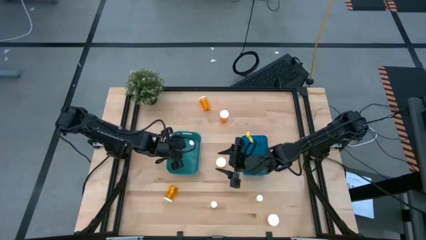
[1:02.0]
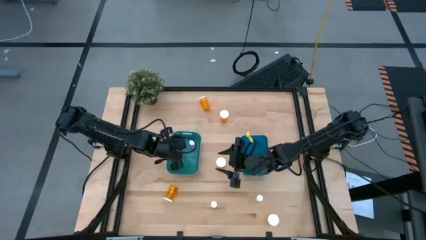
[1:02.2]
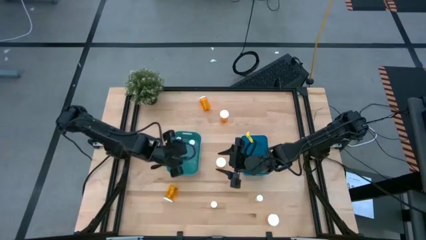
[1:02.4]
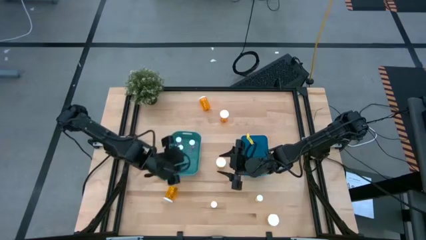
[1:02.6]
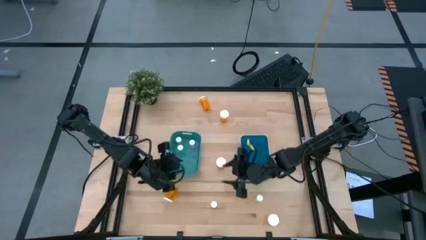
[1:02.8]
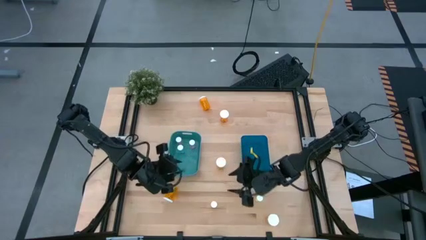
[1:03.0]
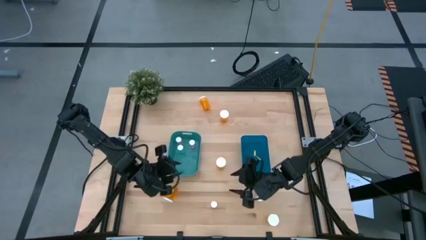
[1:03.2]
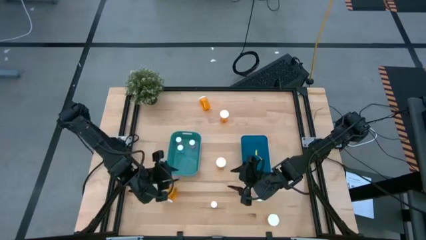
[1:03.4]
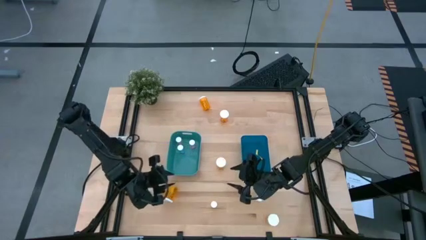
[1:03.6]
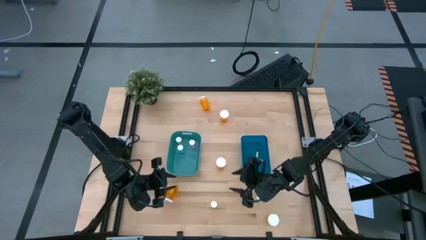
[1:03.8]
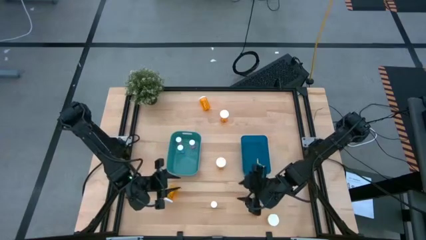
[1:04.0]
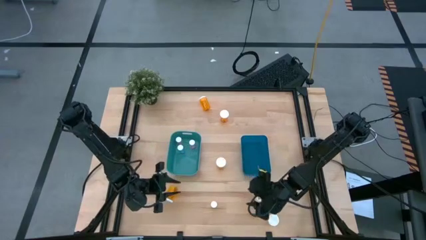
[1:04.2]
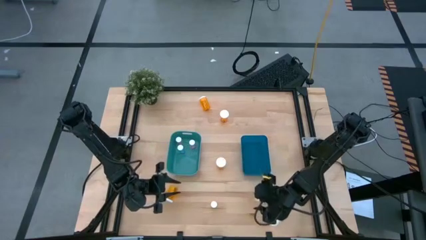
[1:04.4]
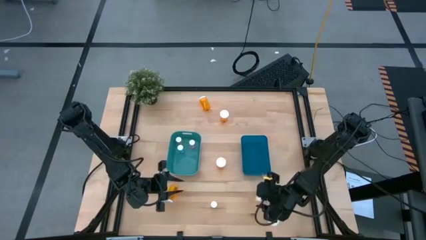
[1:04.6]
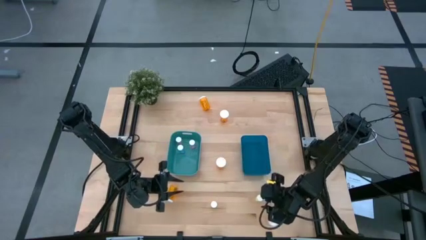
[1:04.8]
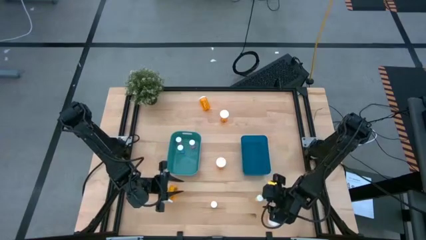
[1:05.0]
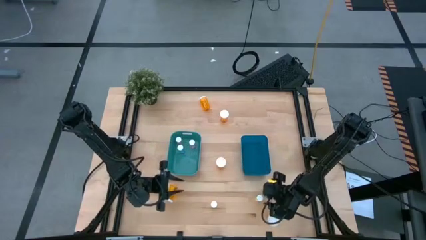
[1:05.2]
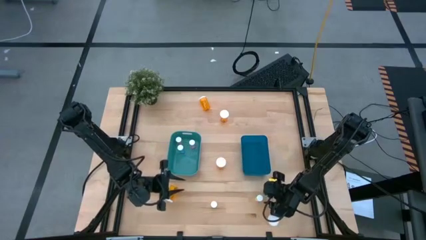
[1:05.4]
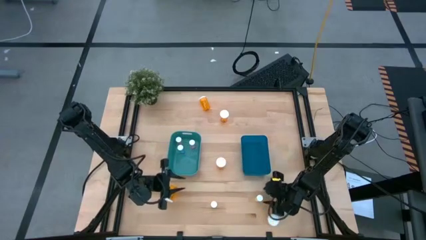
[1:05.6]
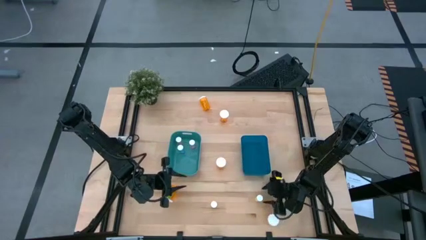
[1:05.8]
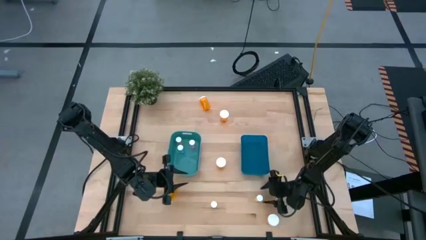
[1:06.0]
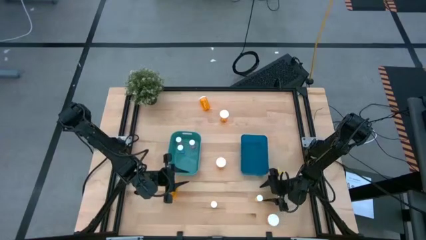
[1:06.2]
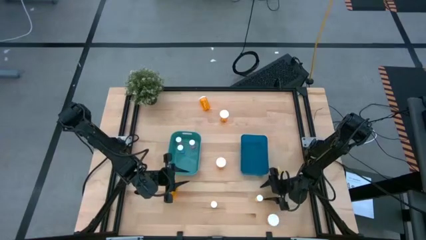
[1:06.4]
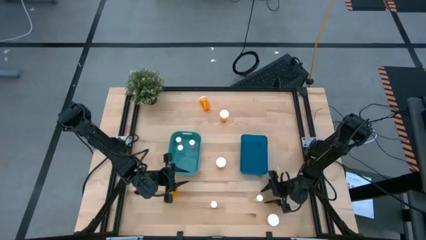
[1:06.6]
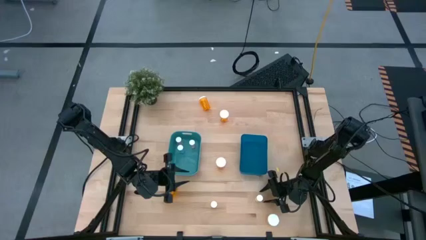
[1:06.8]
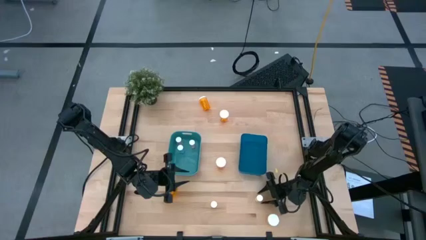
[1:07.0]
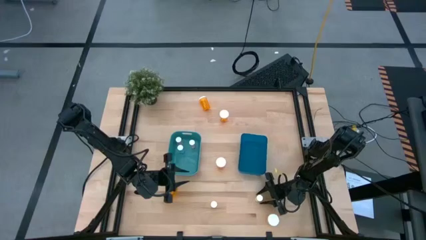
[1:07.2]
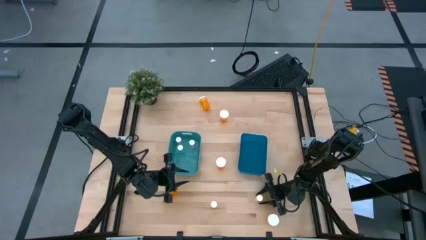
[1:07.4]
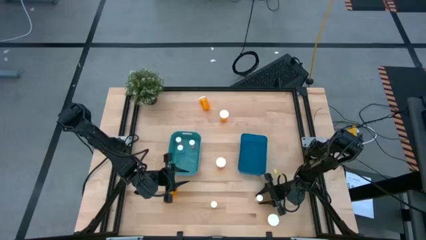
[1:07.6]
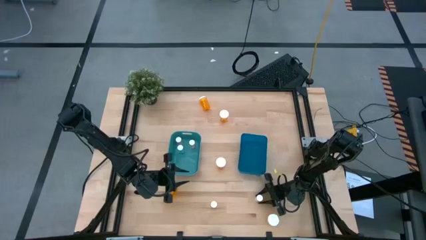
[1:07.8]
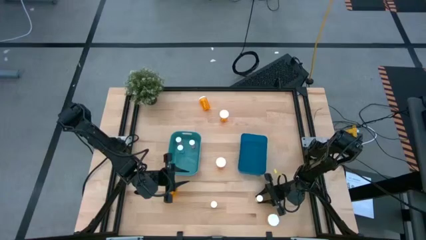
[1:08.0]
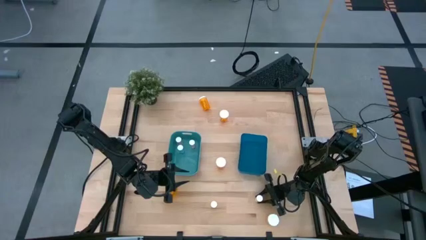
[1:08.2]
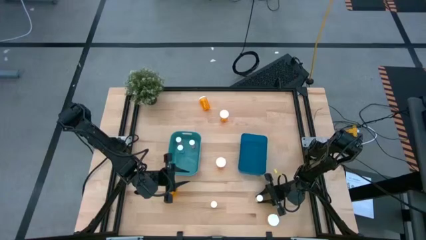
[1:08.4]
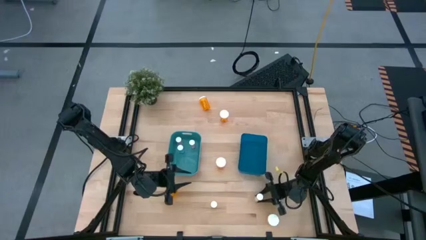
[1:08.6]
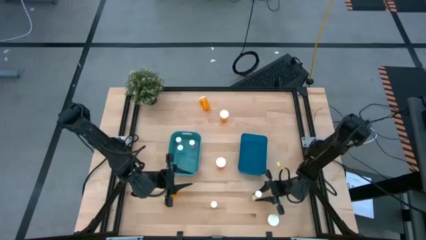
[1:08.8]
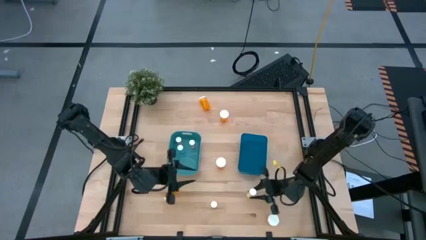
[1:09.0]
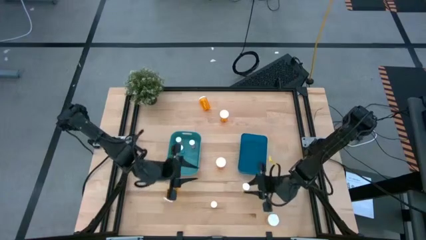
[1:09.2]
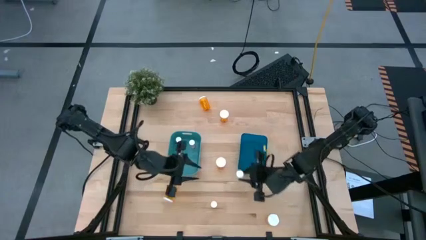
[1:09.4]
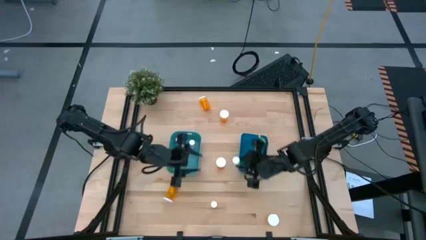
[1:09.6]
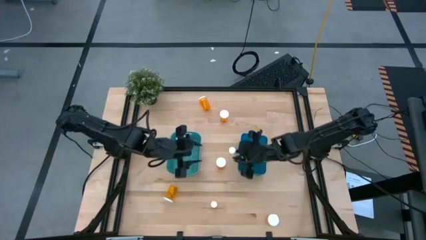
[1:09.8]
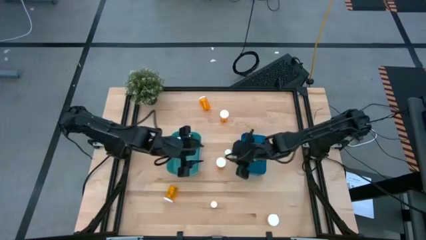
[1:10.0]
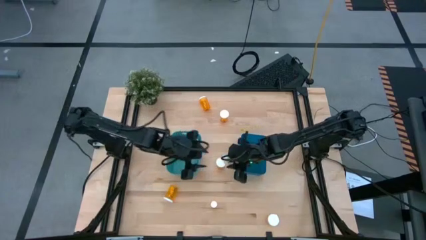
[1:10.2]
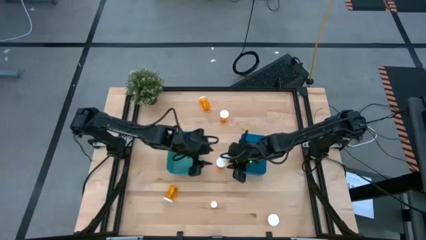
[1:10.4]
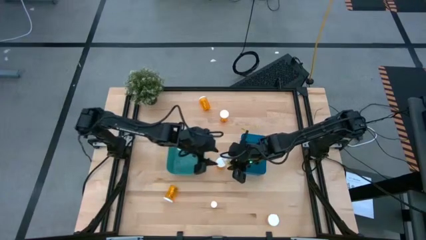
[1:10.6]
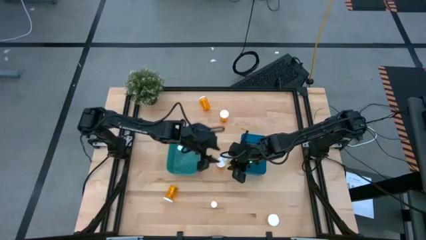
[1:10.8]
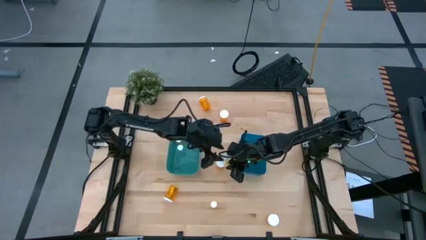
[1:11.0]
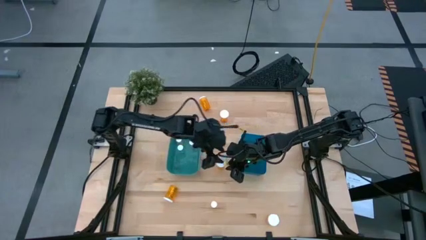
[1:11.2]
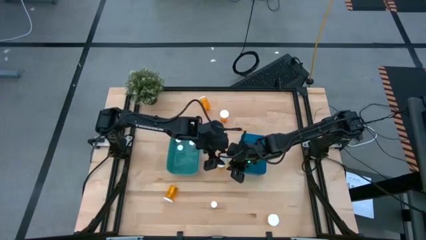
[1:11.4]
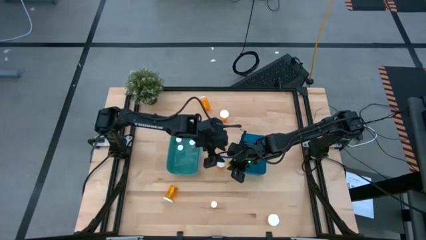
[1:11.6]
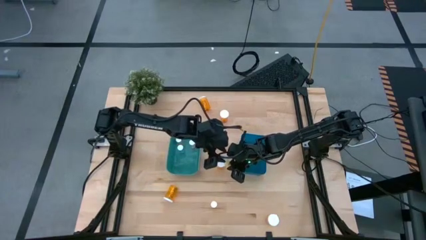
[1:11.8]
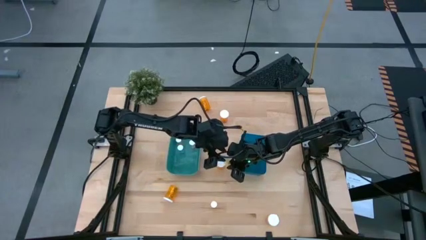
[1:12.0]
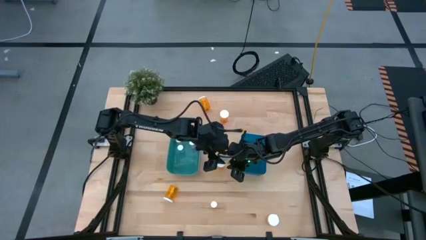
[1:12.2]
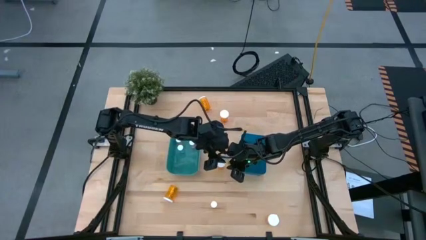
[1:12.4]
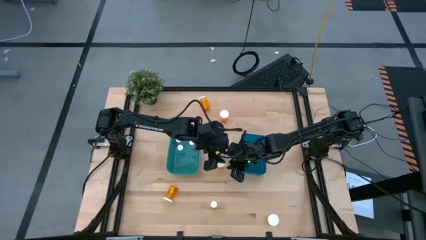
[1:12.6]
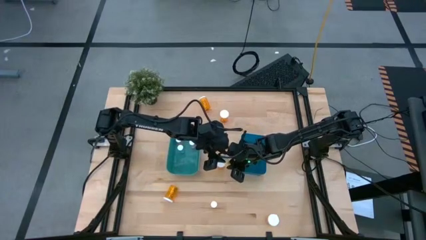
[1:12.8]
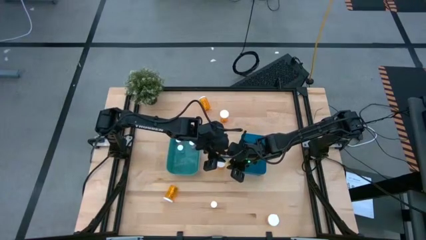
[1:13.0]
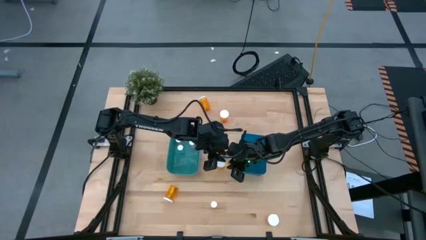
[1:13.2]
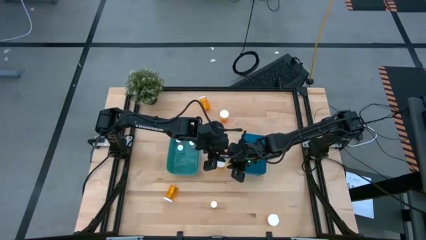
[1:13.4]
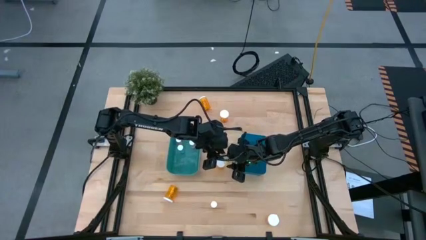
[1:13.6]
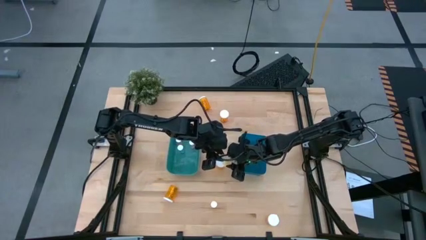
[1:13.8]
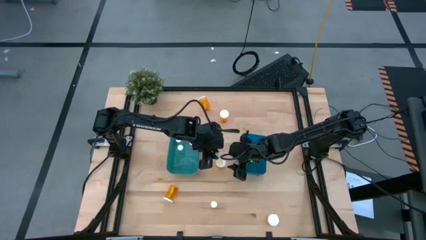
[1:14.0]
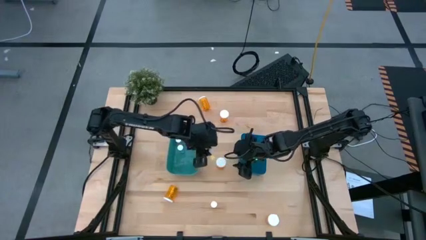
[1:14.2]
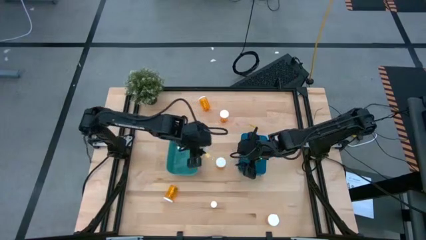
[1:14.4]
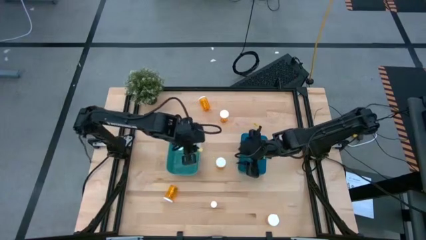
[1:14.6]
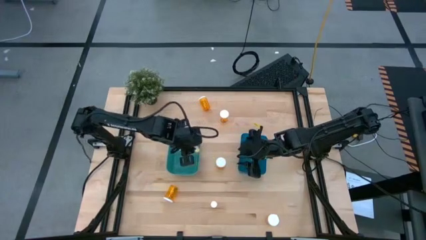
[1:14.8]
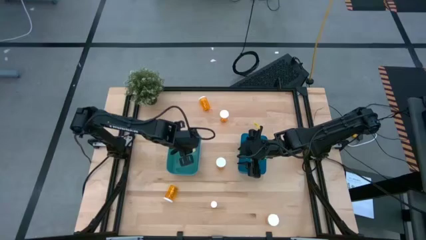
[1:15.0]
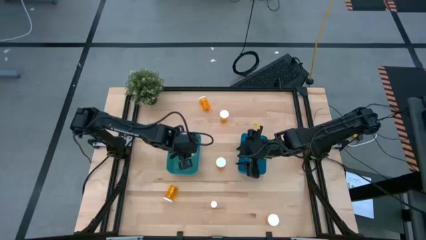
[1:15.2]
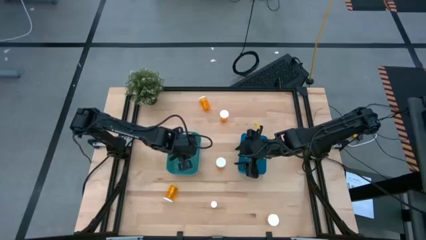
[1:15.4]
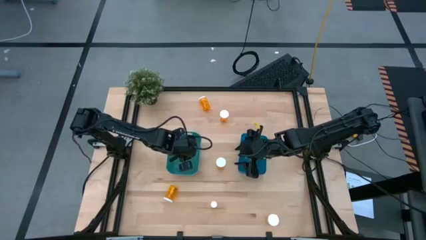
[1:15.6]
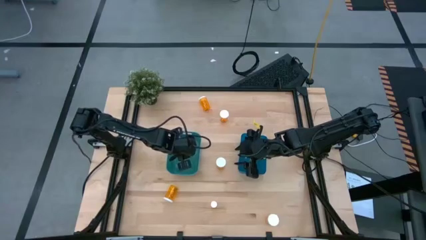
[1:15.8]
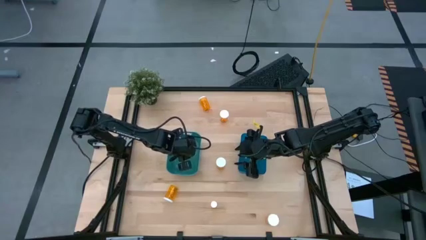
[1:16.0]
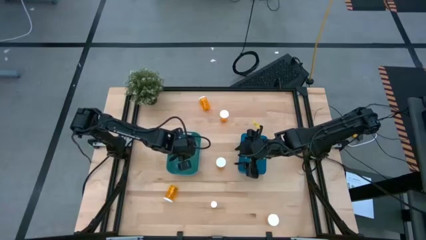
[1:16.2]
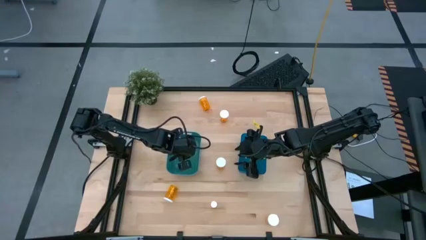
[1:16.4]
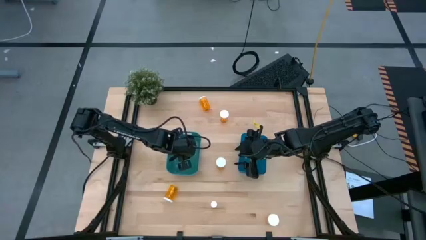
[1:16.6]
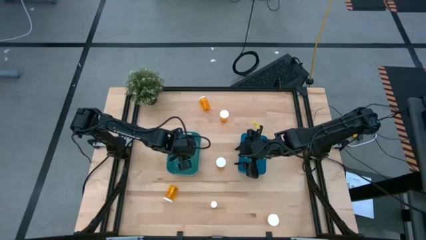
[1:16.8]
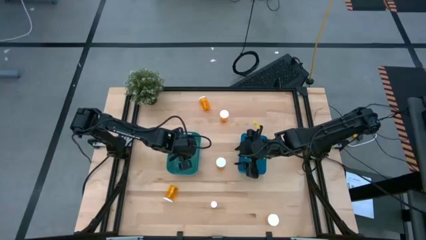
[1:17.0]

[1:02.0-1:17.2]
Task: Pick and place medicine bottles into bin by pill shape (circle, oval)
Put the small yellow pill bottle into the green bin

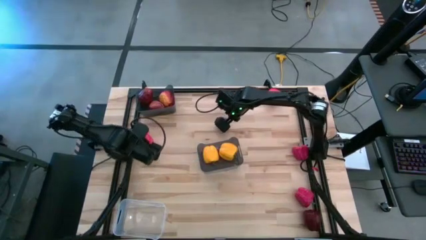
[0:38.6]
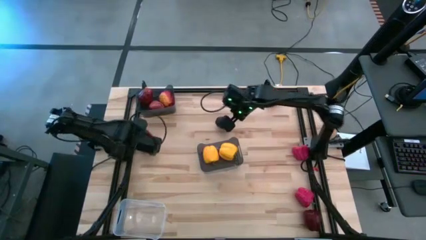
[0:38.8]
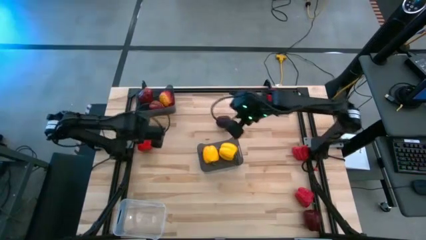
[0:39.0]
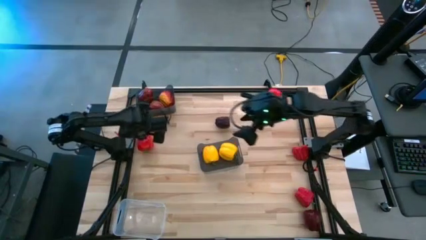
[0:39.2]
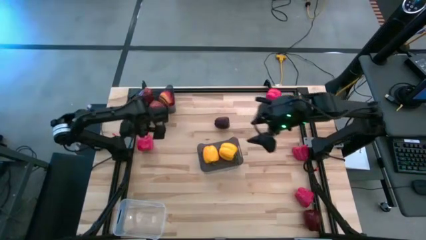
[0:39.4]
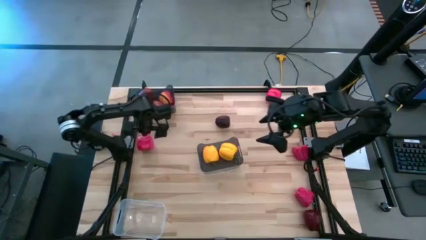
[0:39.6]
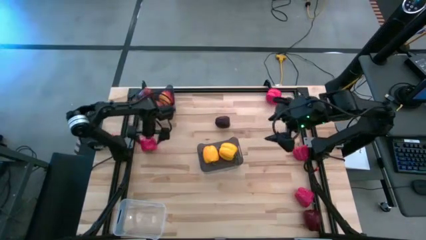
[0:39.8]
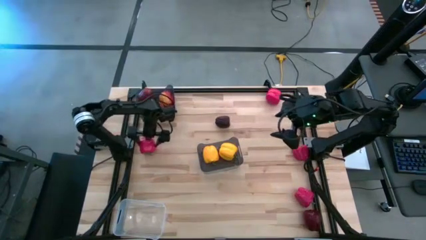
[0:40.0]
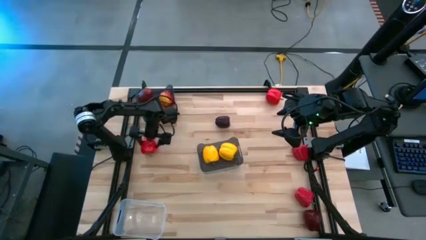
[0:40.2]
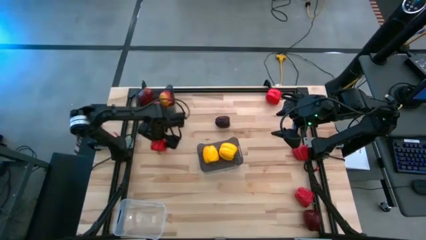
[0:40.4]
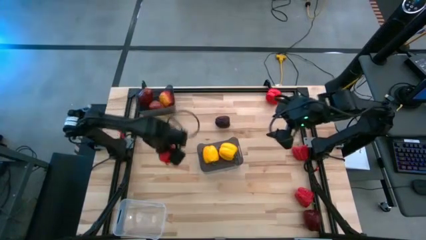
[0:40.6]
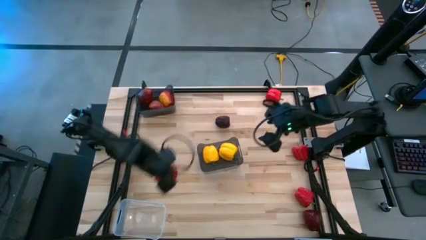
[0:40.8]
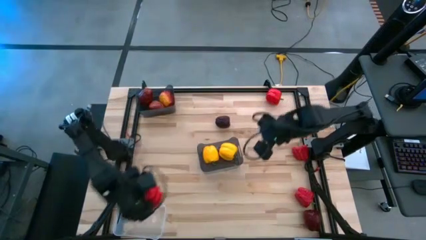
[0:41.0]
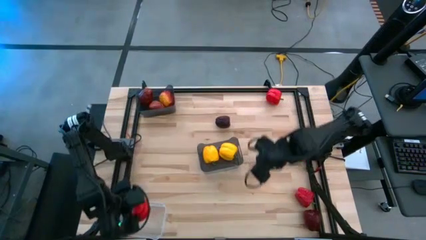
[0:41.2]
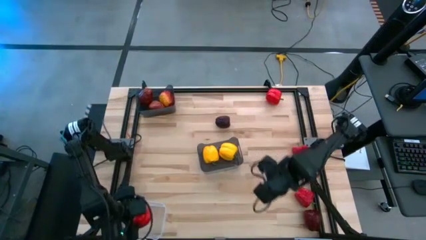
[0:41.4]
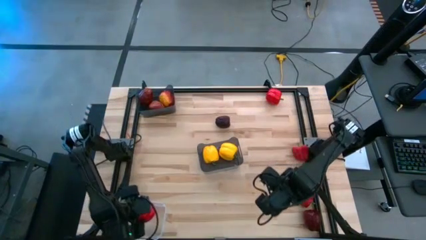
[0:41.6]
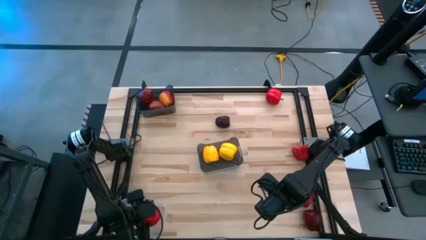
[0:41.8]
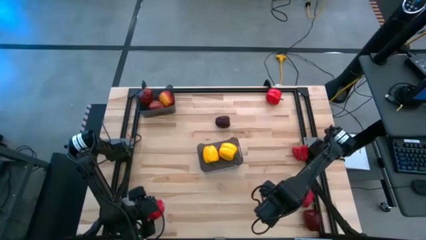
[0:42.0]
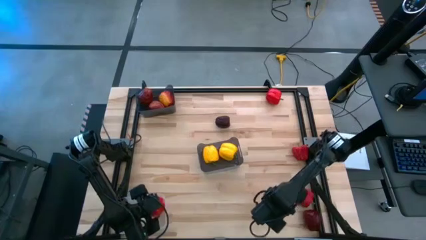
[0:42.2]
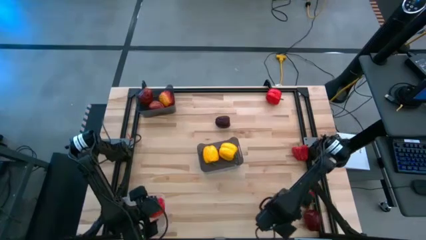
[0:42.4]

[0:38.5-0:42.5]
Task: Sort produce into baskets
Put the middle left red bell pepper into the transparent bin
